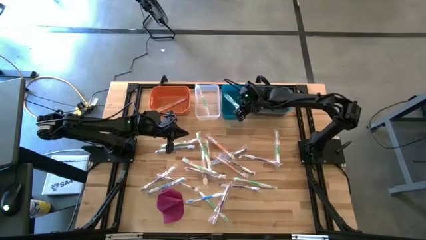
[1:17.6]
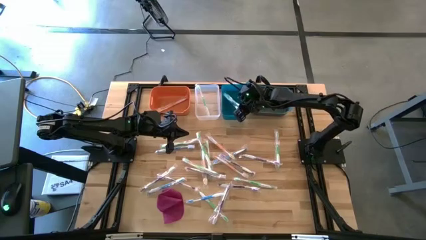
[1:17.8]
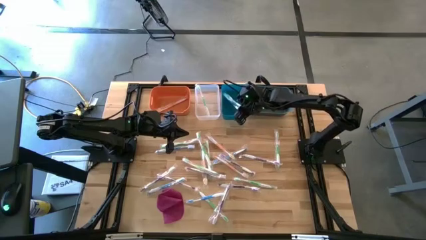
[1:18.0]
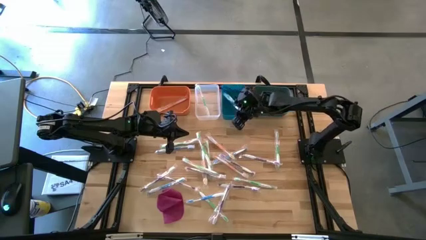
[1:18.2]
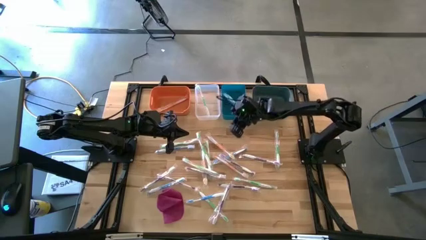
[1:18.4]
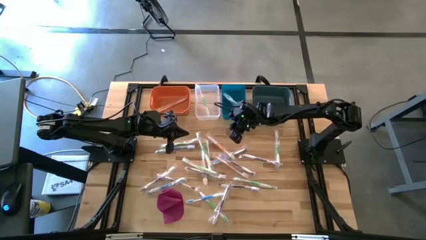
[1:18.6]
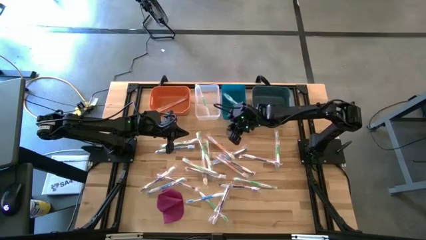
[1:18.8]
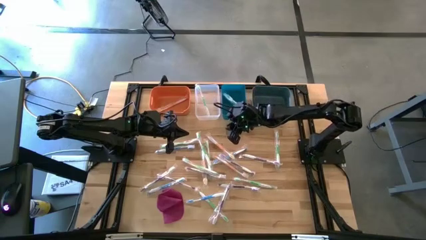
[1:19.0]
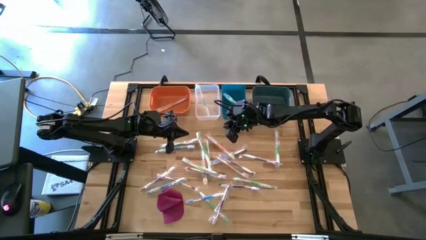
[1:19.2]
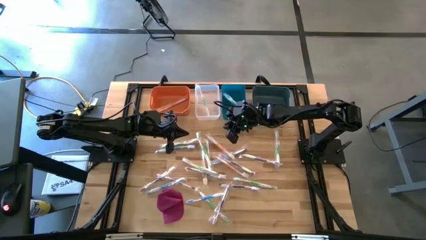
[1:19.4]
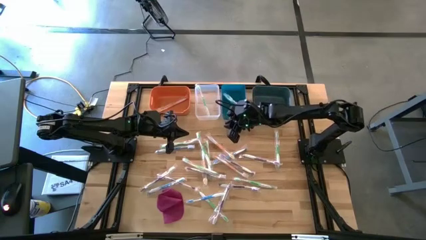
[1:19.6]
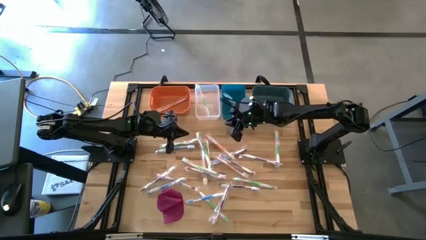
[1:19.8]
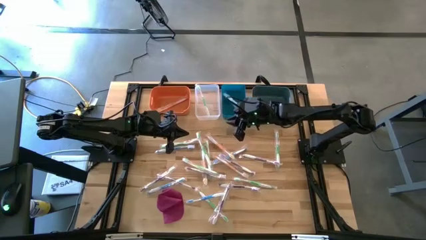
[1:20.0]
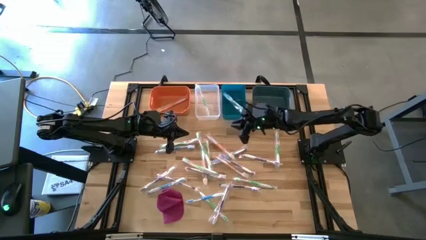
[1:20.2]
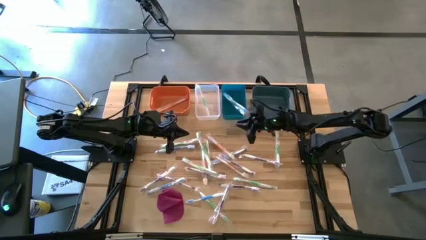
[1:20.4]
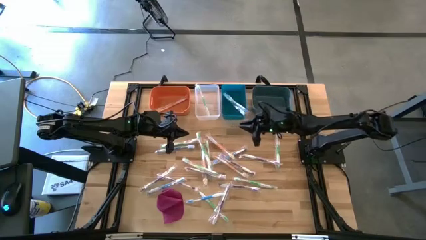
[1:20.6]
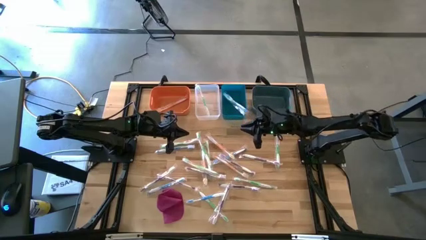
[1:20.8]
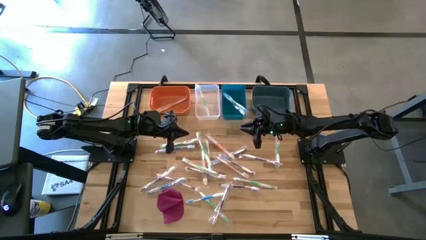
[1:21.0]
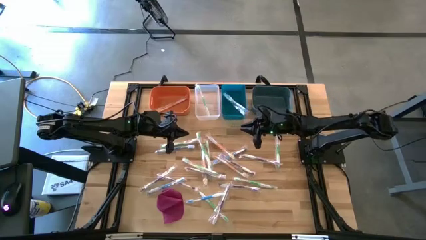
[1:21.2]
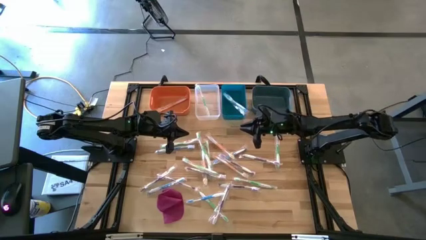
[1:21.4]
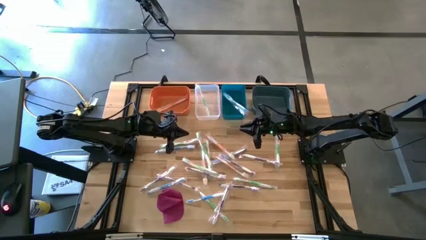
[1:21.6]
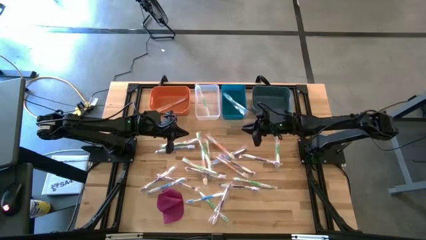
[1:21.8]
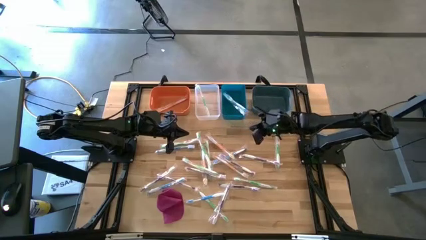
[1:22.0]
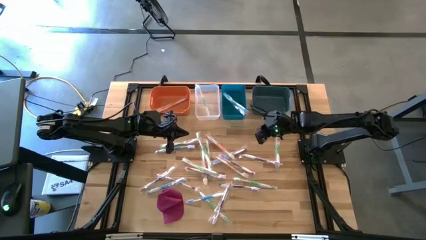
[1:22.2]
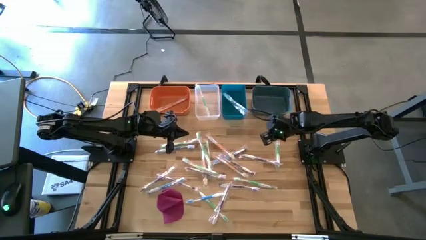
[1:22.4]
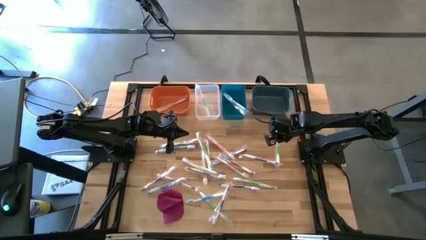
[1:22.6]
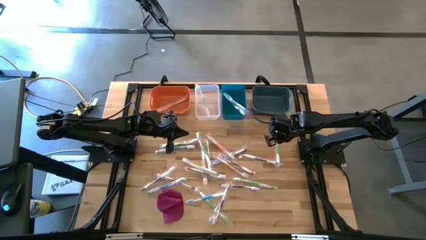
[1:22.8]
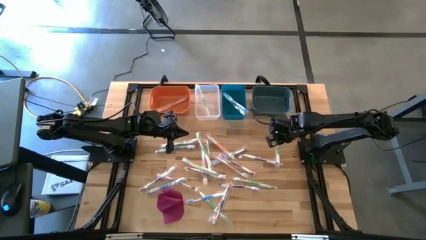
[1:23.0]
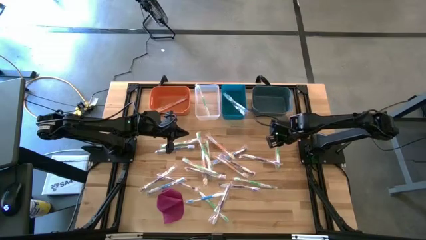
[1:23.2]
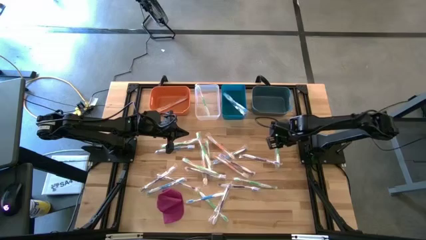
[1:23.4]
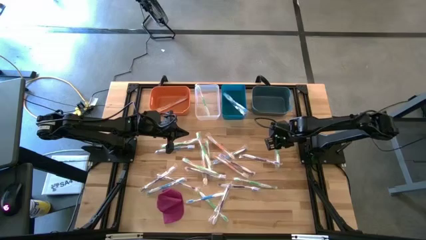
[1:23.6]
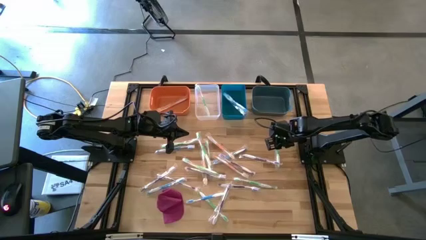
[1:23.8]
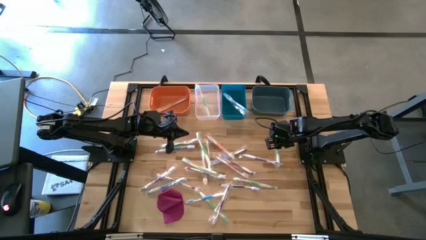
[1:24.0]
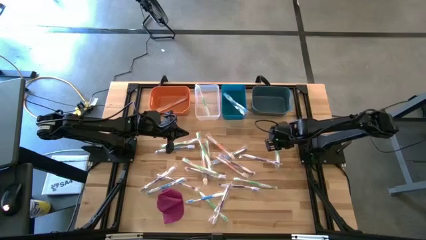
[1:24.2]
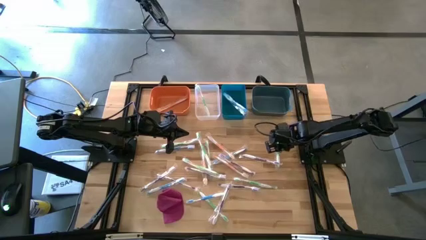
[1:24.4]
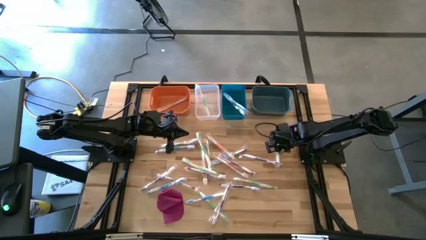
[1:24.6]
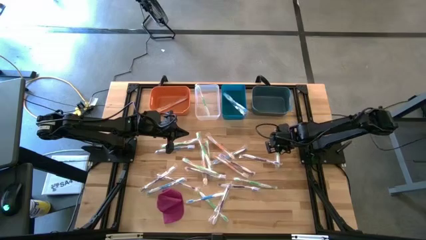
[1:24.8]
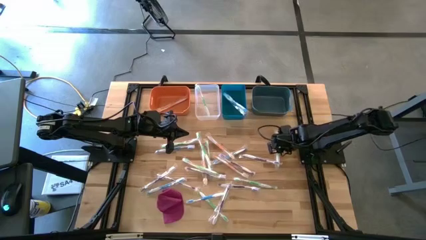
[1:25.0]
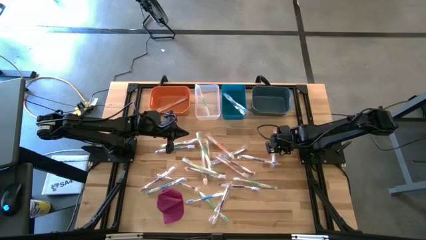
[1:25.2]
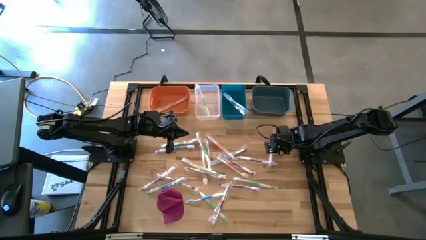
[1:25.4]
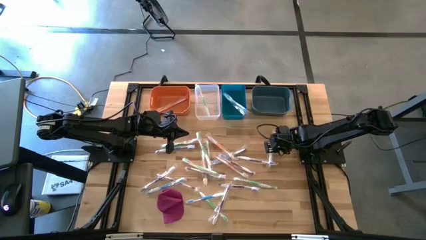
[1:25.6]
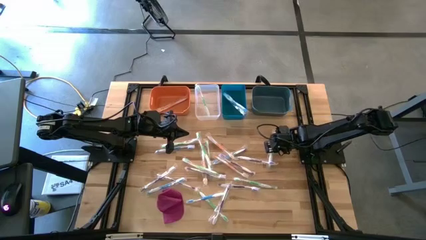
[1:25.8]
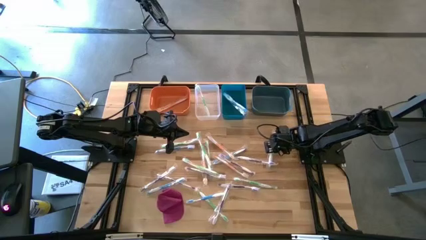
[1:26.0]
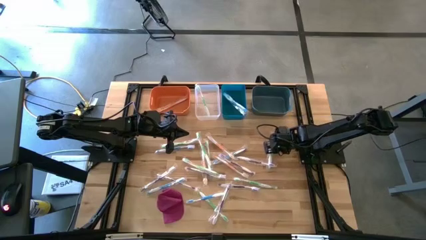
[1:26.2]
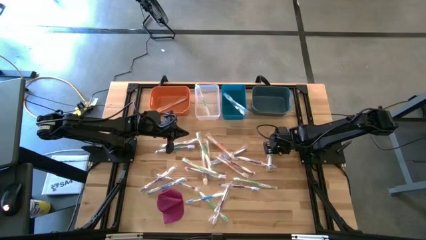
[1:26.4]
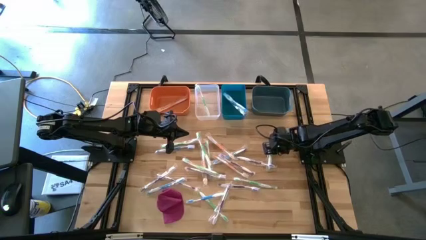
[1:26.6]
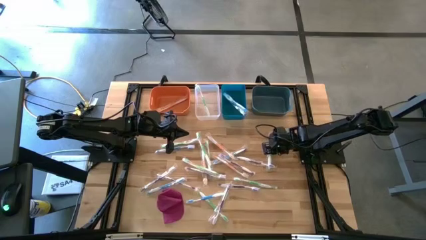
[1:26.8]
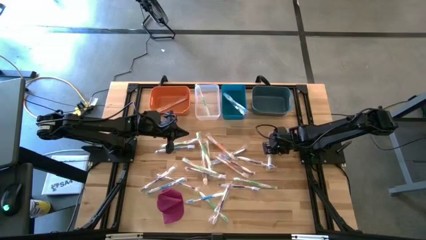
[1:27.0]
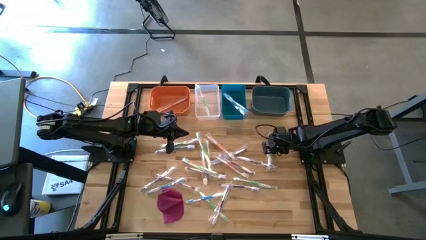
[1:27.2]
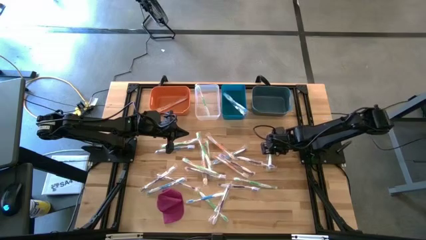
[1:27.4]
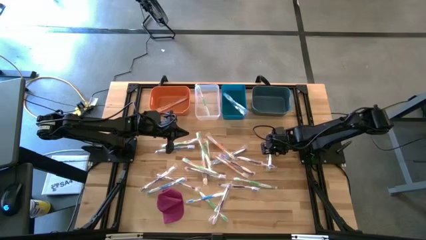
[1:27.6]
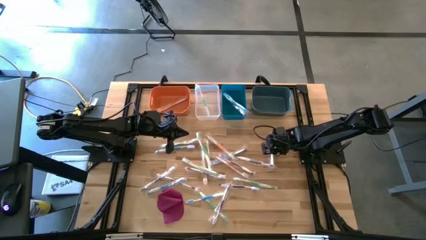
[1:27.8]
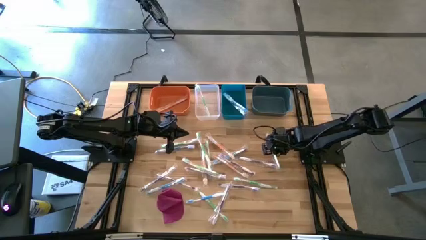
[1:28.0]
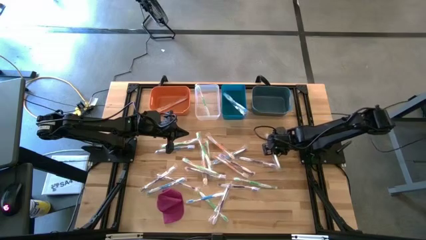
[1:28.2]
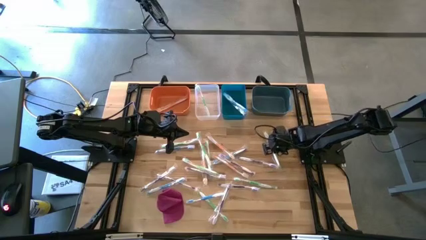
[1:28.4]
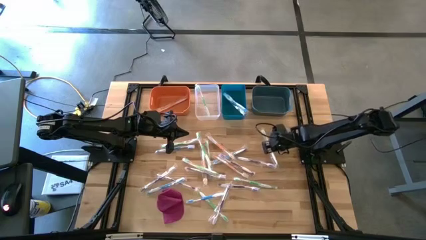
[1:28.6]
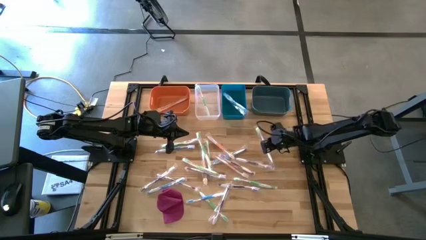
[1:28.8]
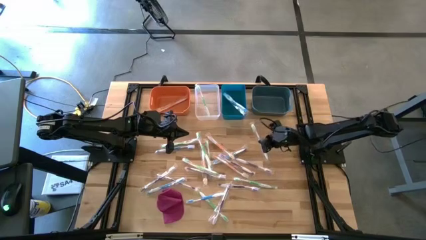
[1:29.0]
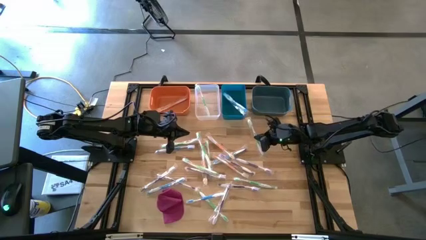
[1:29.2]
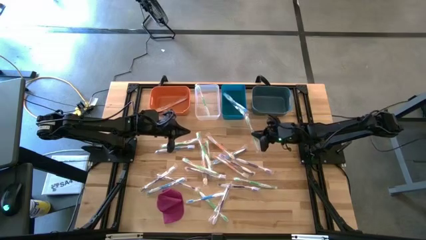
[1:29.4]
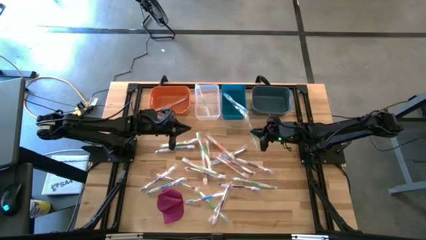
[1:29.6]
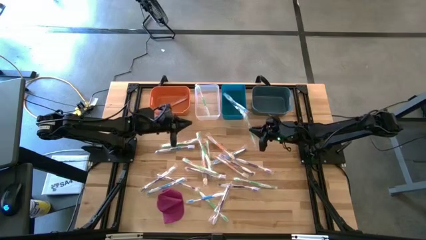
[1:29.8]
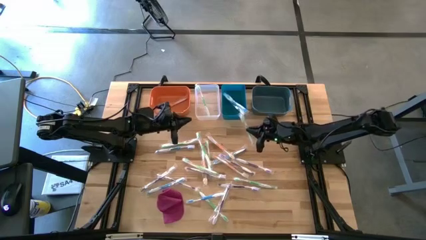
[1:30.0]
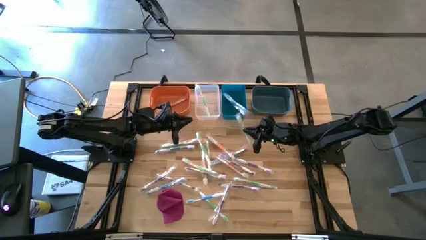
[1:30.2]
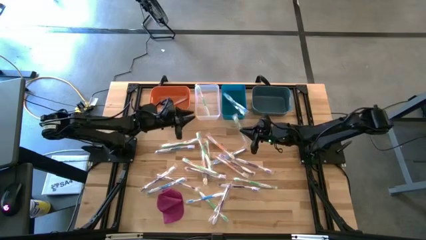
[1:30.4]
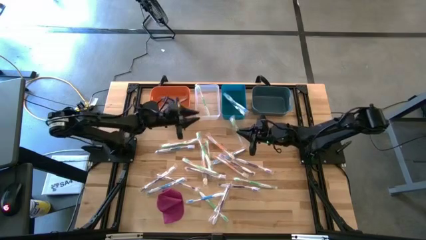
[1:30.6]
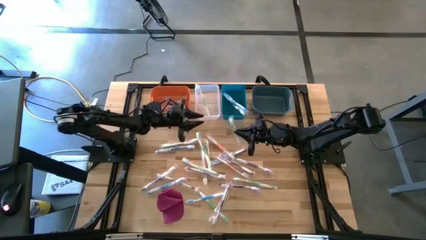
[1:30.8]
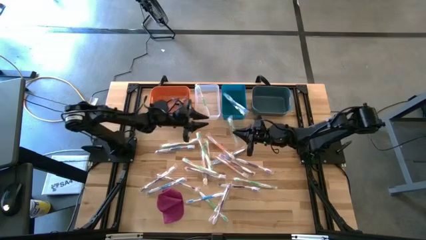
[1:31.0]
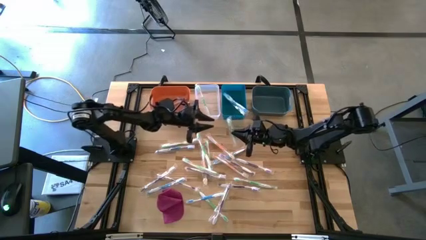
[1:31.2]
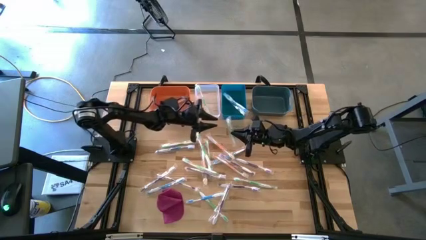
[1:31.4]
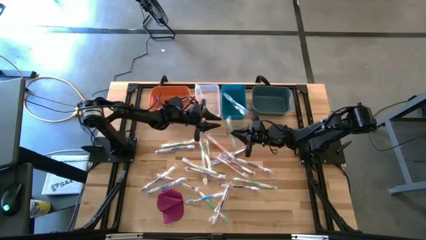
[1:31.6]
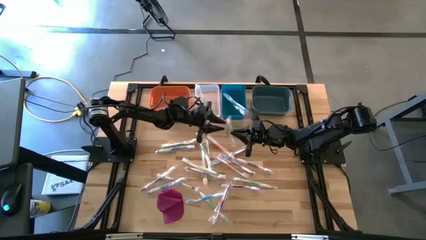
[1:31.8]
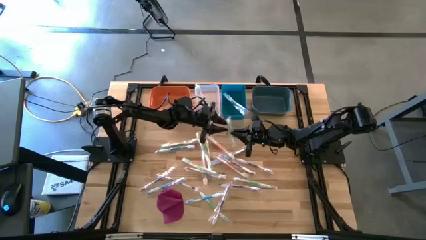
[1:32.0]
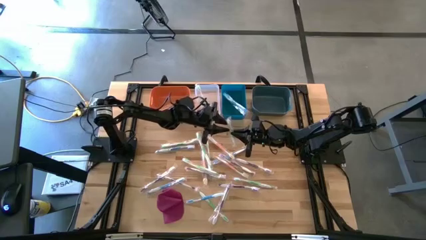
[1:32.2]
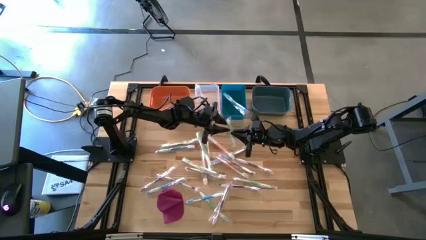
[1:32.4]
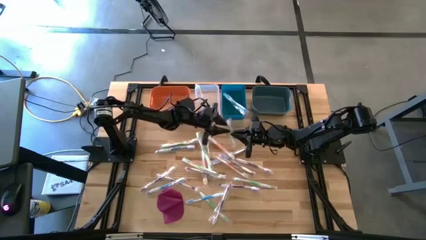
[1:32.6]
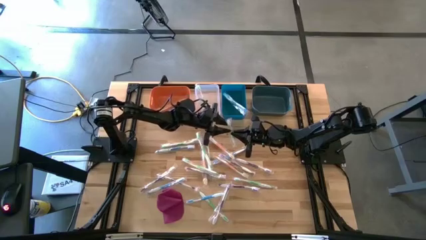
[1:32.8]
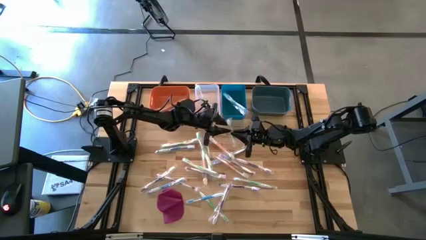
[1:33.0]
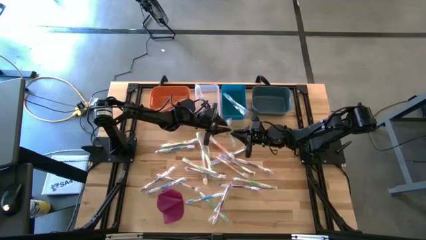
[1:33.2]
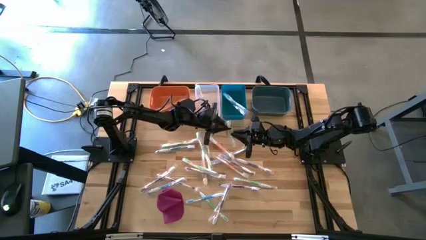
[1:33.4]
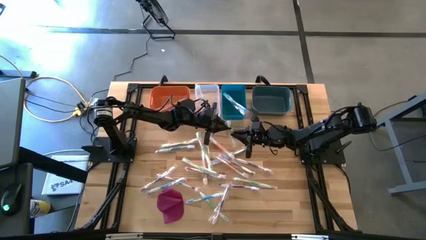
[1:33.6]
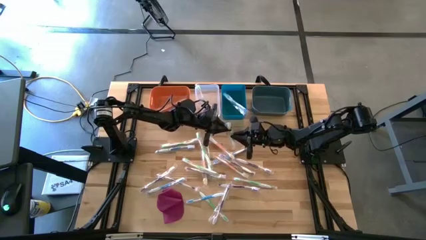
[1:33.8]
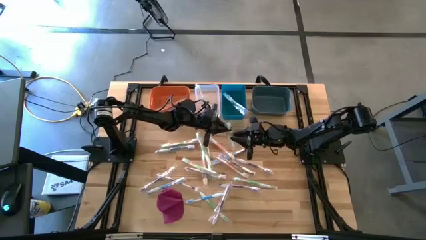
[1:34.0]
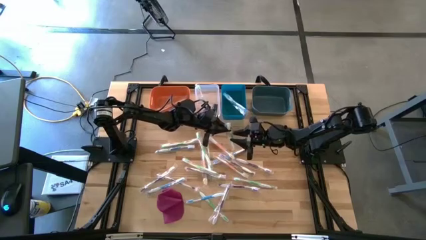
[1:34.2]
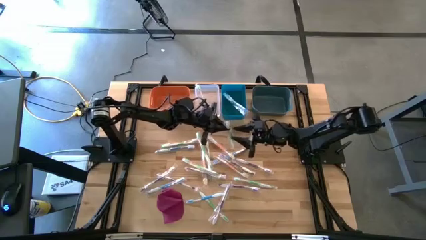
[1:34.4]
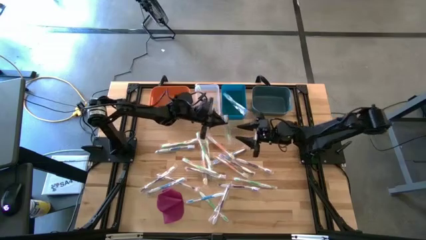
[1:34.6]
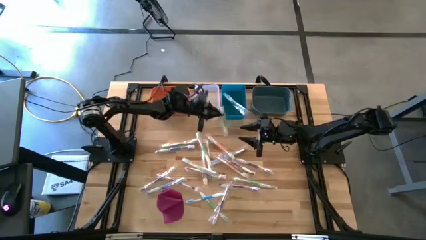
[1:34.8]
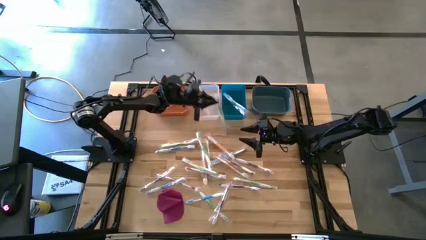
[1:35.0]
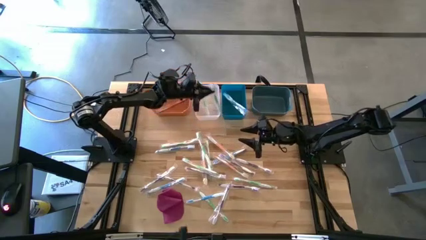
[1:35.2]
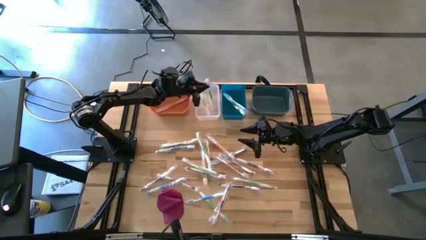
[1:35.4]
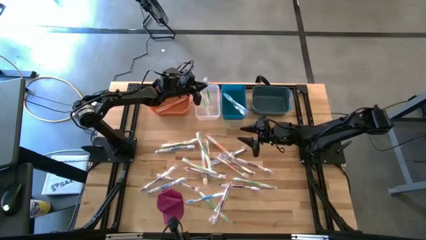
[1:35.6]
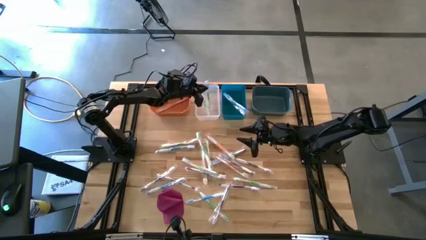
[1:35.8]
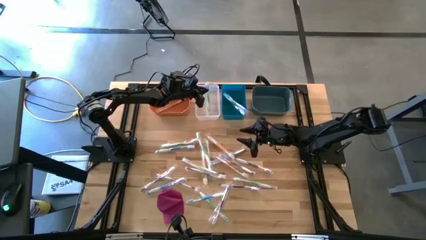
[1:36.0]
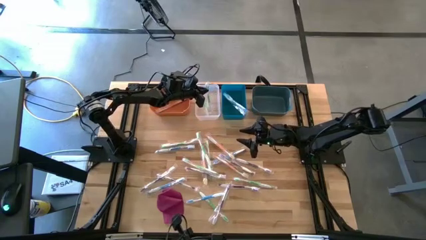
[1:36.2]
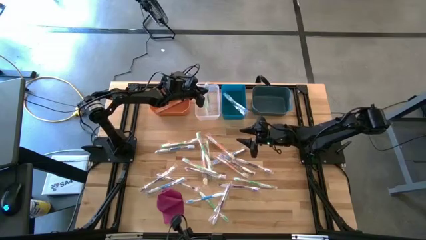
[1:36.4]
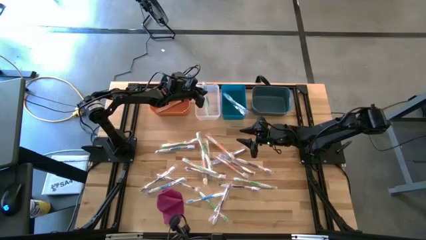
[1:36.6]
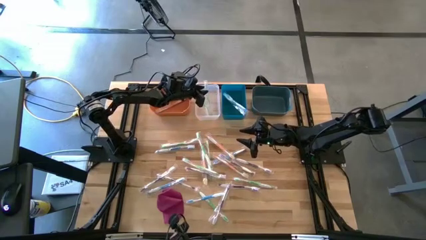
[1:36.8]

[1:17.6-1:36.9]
Task: Pick & Place Toothbrushes
Put the green toothbrush into the transparent bin
